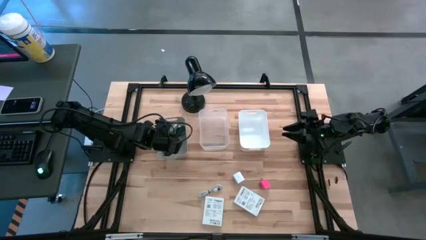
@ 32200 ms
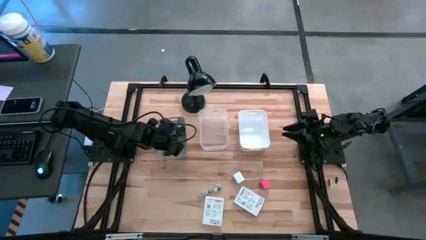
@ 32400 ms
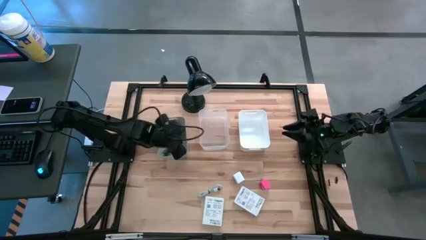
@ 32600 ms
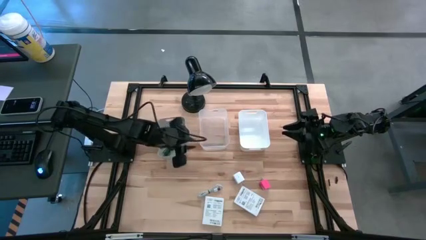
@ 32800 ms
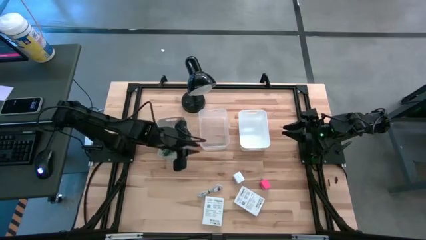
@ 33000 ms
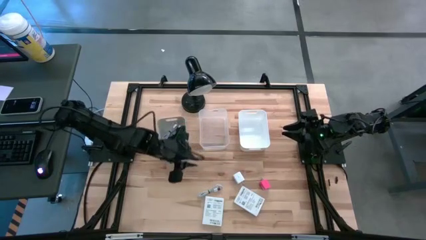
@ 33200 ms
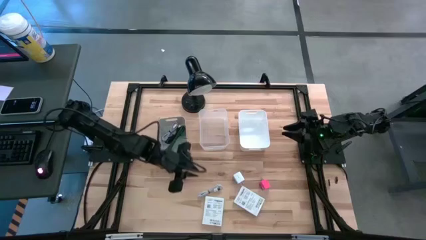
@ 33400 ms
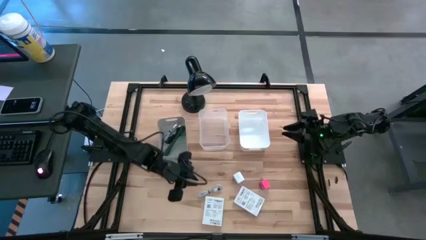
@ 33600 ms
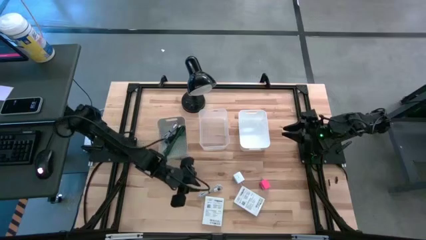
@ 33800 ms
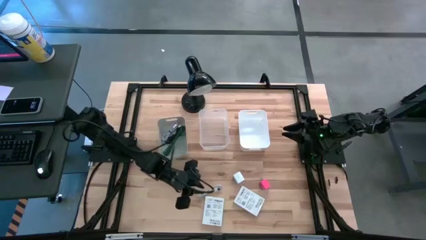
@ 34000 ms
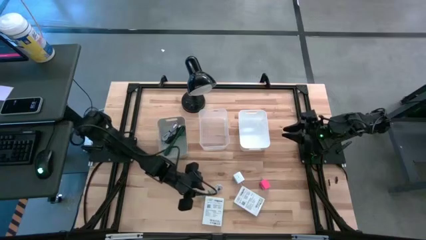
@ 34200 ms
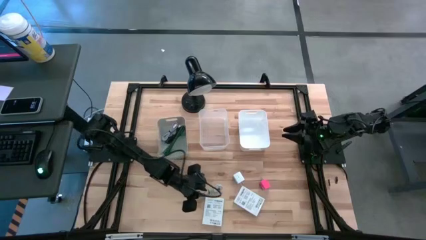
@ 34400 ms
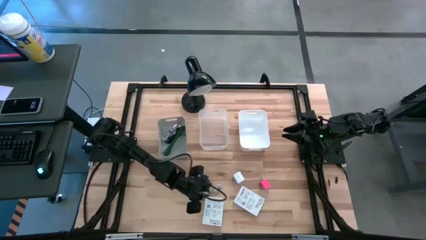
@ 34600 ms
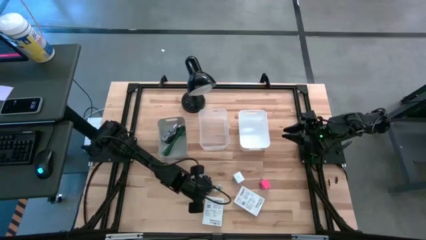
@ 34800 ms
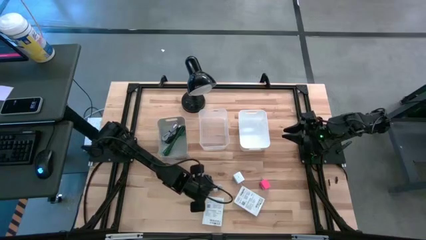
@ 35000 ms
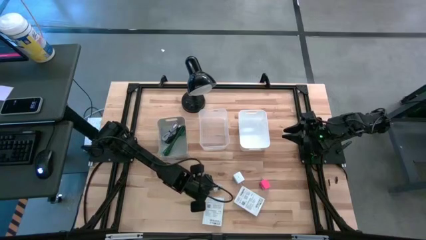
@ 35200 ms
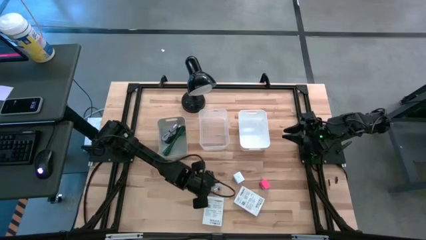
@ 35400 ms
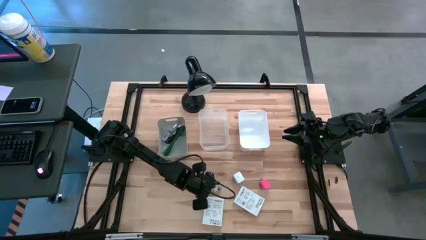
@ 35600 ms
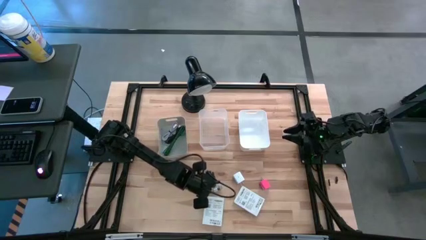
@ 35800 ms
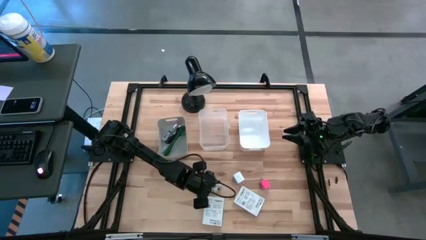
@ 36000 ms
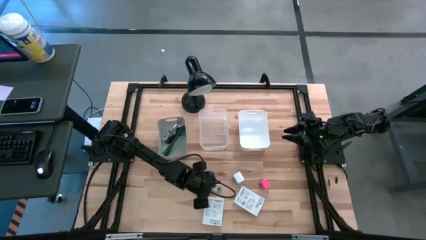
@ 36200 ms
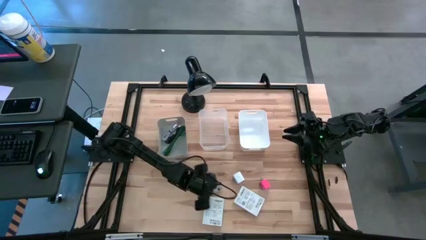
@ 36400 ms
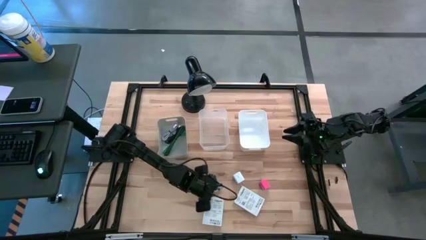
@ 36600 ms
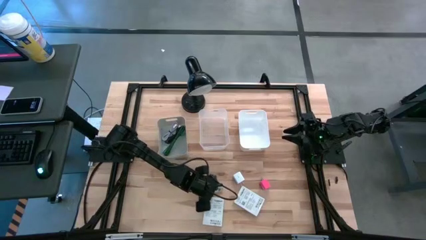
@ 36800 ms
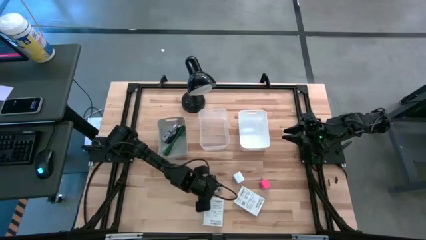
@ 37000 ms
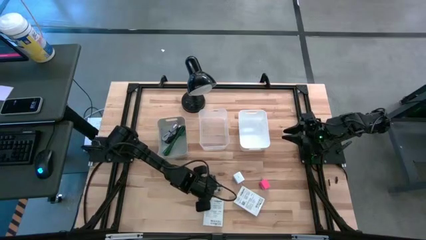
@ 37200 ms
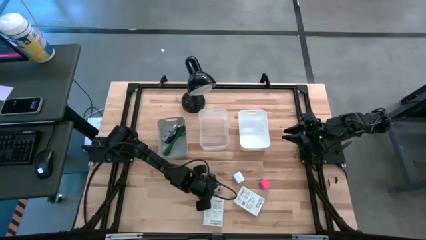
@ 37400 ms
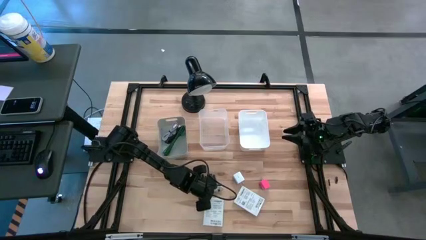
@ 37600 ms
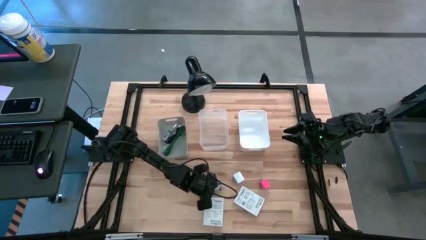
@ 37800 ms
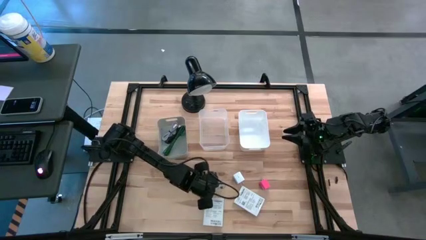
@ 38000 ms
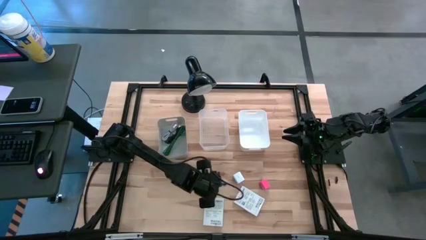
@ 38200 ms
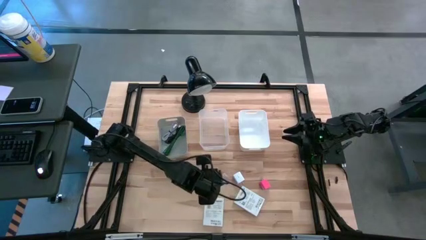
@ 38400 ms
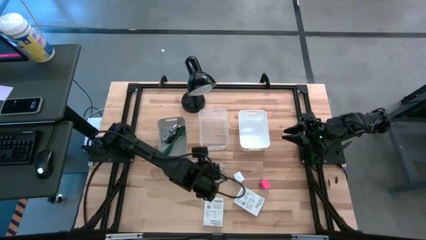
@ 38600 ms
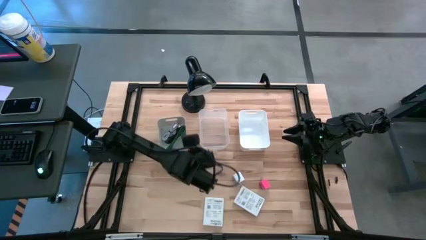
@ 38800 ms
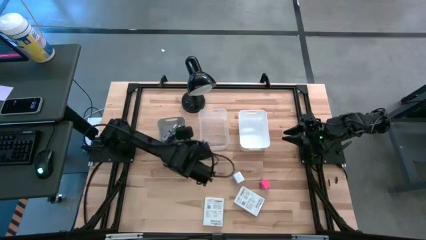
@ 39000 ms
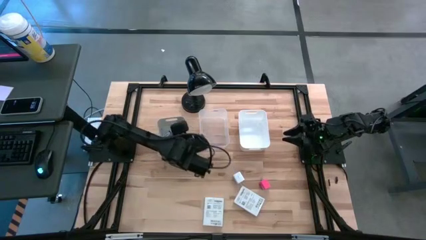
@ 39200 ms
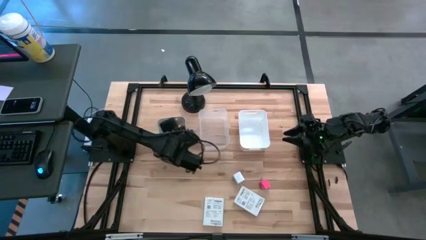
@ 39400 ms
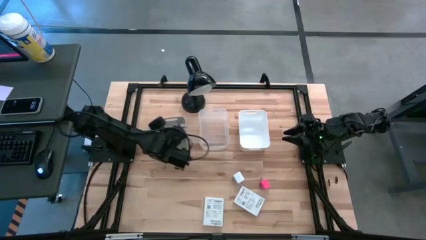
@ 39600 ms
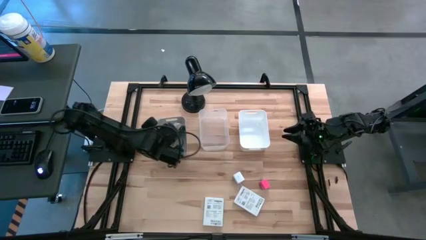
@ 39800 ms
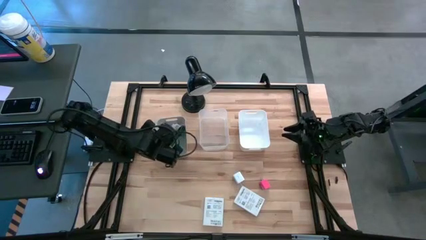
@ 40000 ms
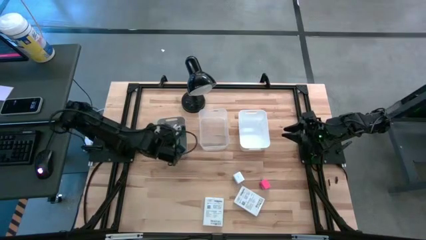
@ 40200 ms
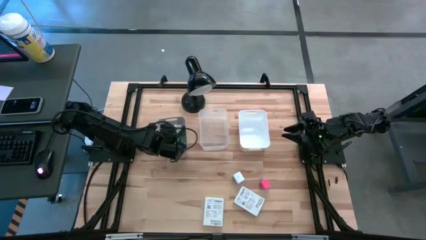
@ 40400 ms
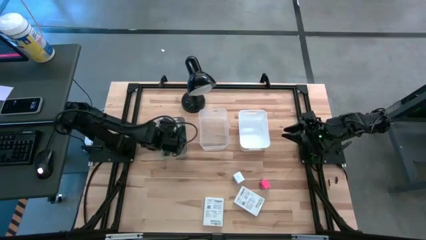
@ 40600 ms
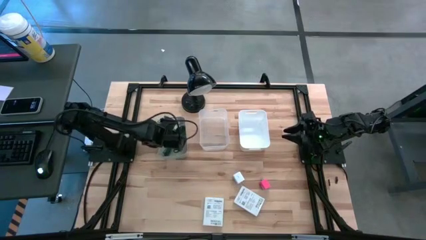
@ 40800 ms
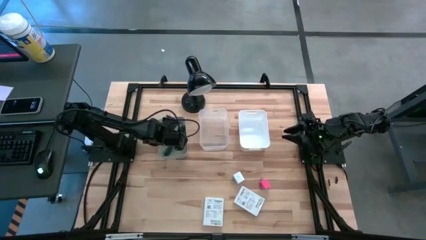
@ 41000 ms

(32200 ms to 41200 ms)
Task: Pick and place items into bin
Put the white charger cable into the gray bin

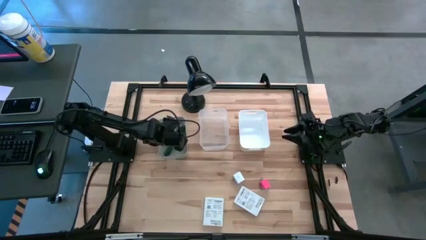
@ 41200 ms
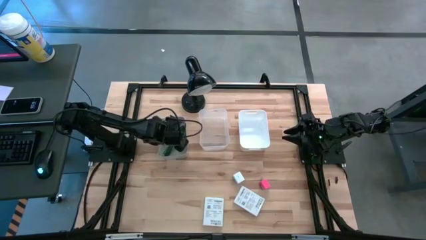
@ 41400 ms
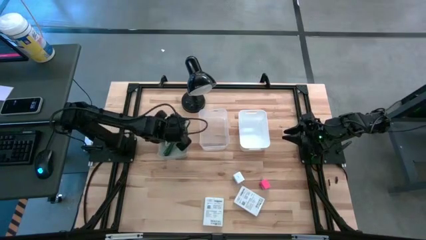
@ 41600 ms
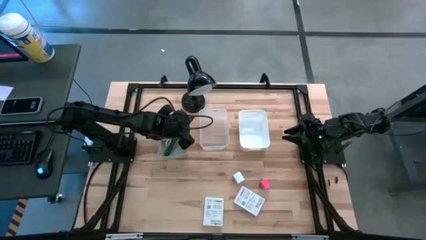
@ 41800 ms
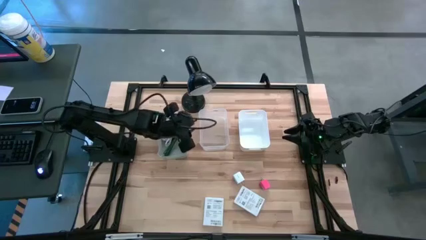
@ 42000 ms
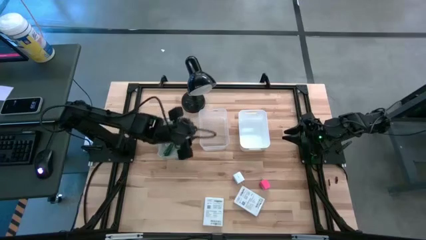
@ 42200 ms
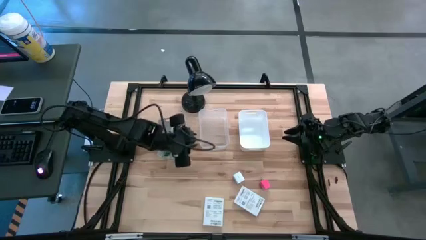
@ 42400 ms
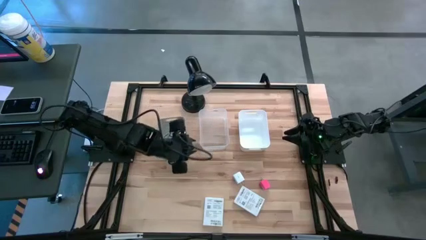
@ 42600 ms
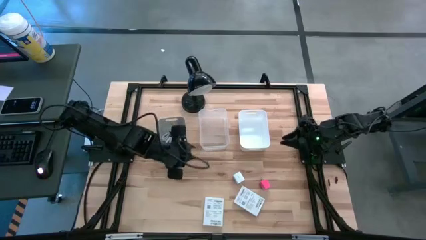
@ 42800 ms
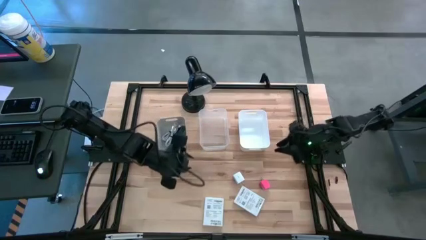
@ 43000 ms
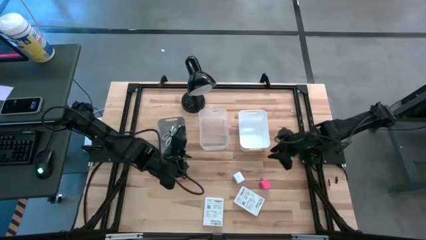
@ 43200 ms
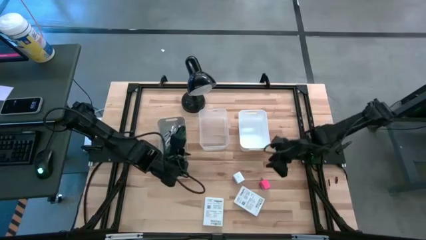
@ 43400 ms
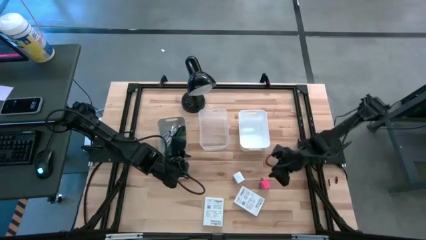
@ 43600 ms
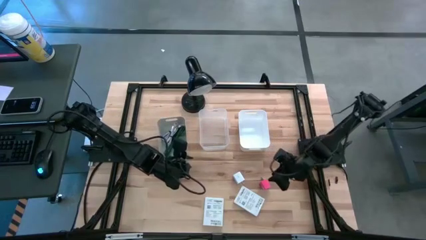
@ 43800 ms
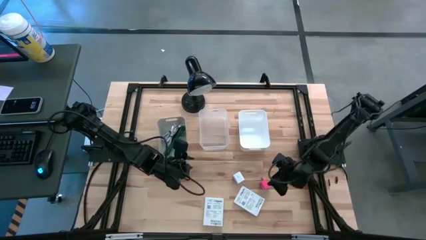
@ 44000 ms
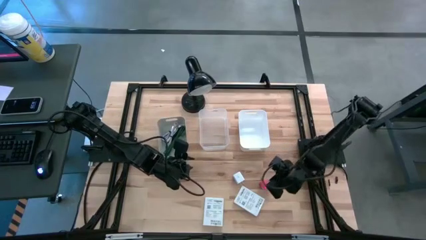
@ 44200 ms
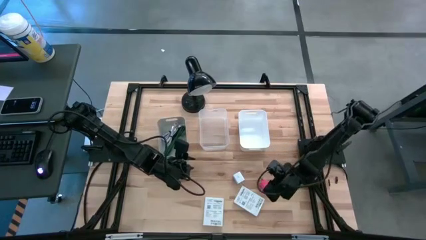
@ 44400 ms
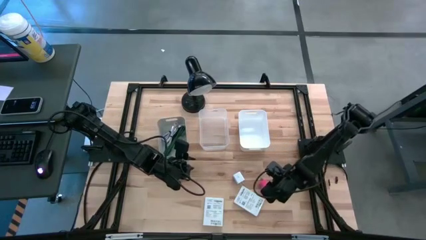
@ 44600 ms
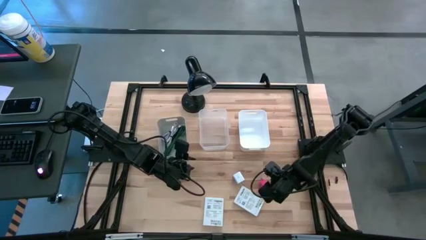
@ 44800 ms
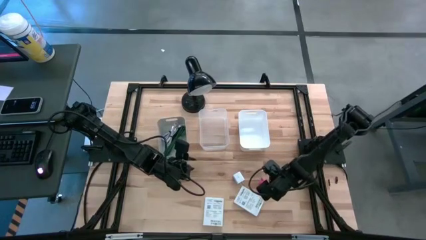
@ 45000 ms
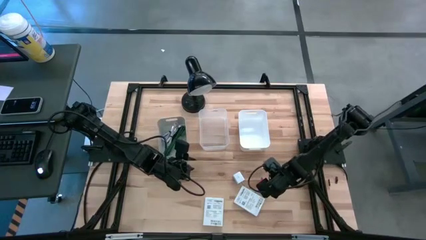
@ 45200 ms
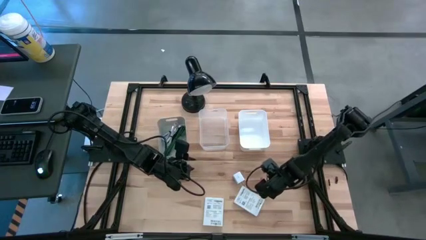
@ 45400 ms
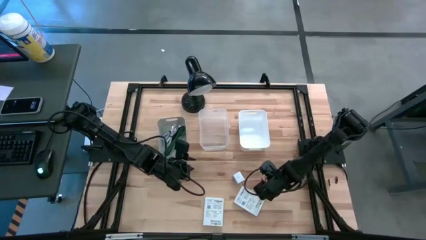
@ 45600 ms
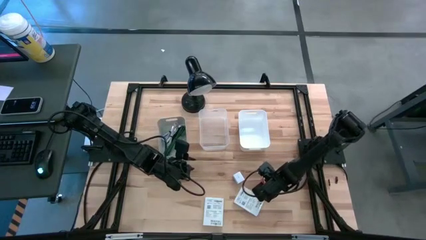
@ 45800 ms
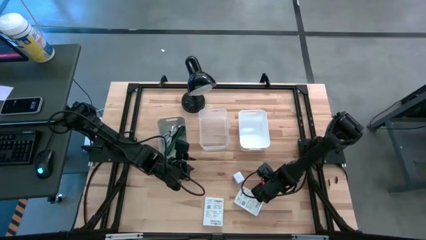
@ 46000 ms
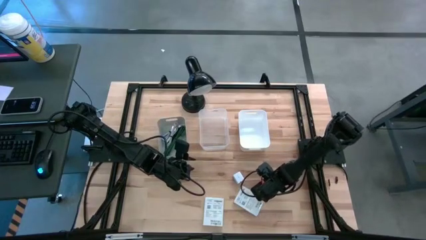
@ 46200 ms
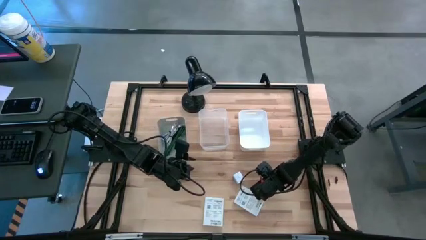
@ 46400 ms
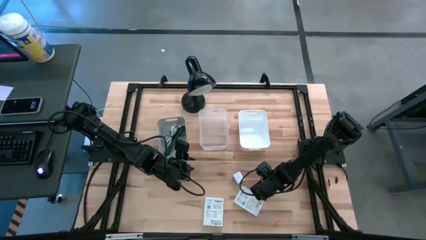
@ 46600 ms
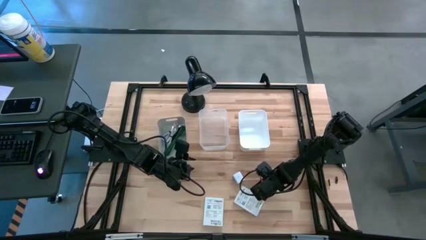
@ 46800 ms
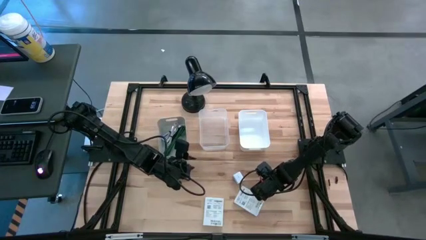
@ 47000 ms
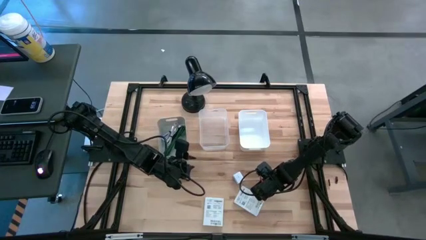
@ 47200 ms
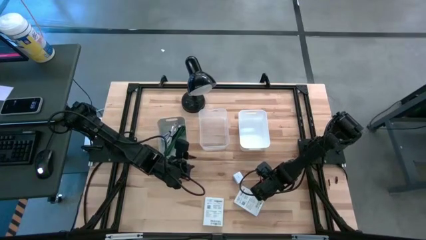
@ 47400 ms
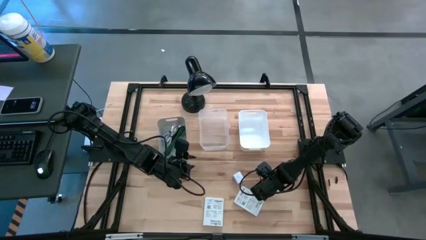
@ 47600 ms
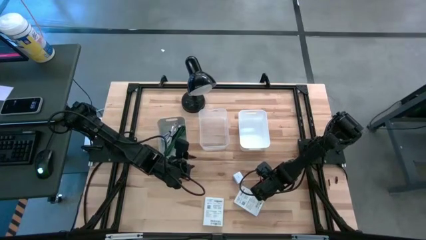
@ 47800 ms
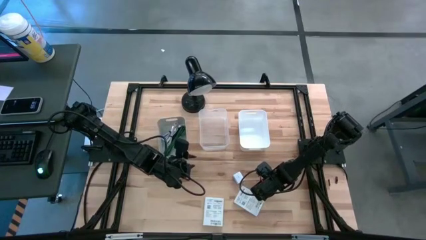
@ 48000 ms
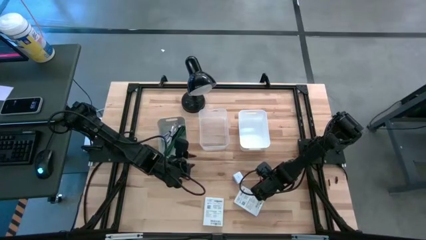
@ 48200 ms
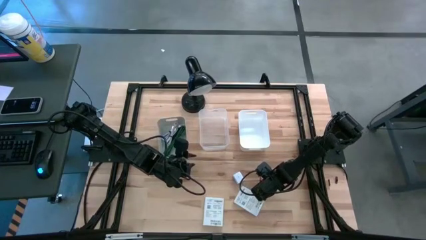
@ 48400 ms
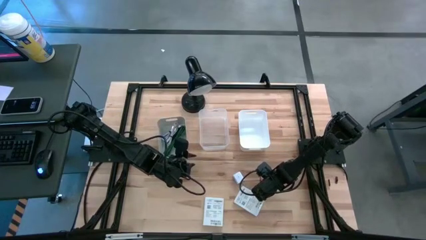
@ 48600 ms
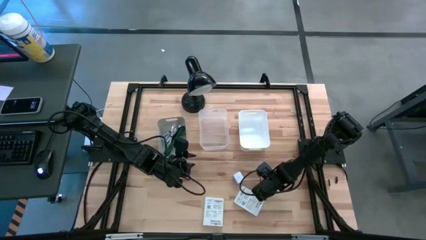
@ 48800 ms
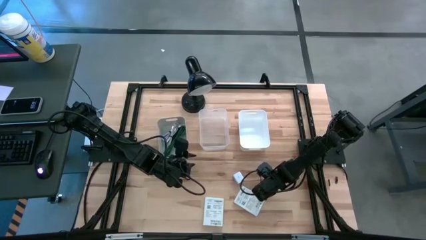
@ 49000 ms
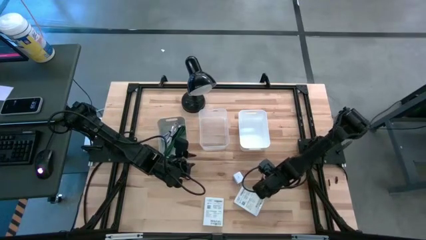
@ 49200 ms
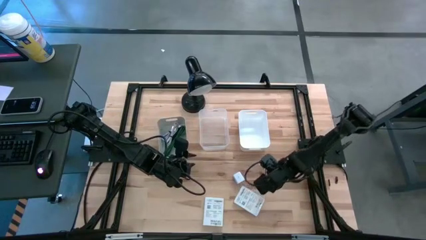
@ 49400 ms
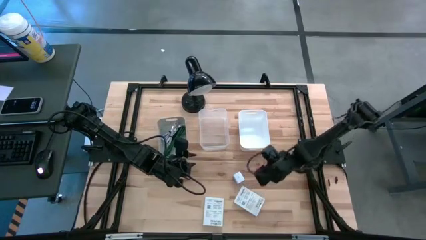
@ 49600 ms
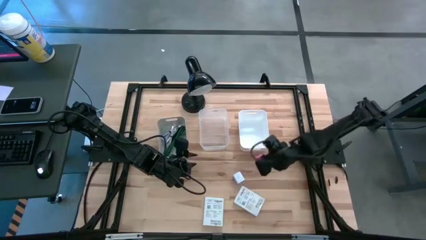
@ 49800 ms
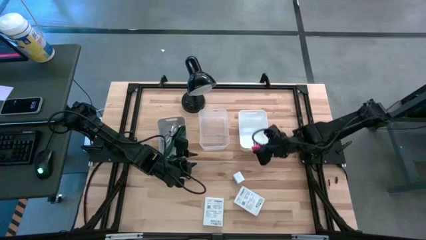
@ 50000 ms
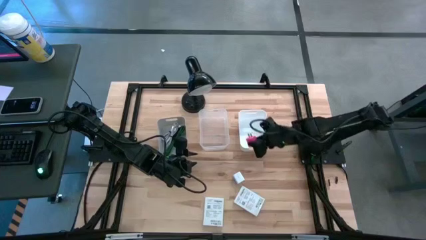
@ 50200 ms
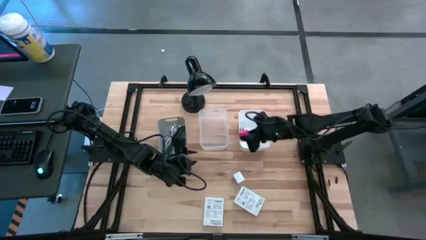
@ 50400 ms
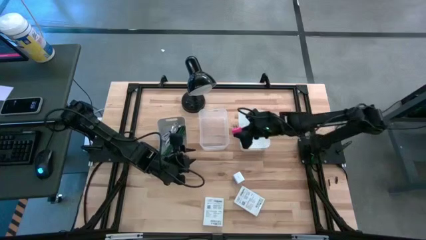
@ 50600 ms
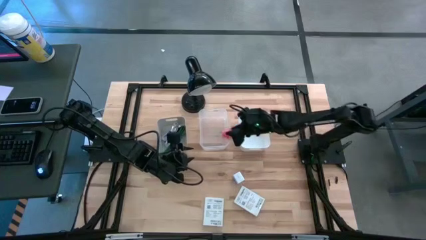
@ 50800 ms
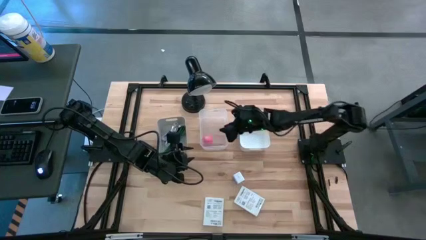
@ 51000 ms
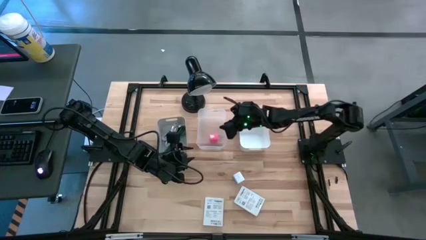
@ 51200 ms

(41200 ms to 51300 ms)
Put the pink charger adapter into the transparent bin
